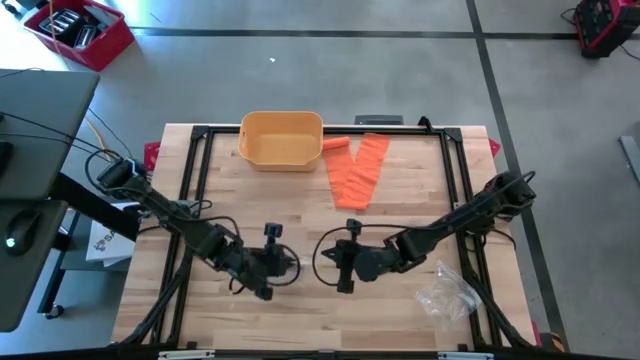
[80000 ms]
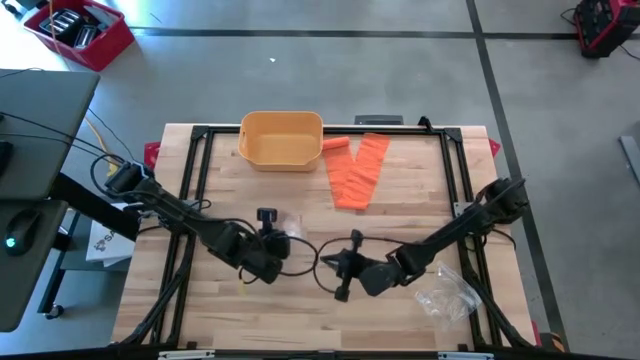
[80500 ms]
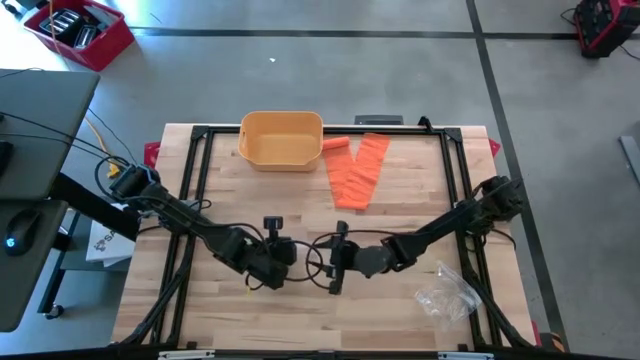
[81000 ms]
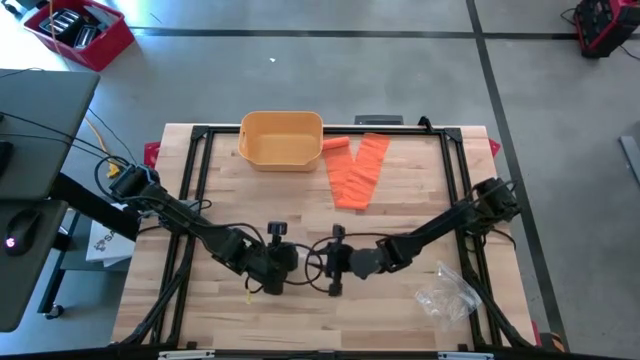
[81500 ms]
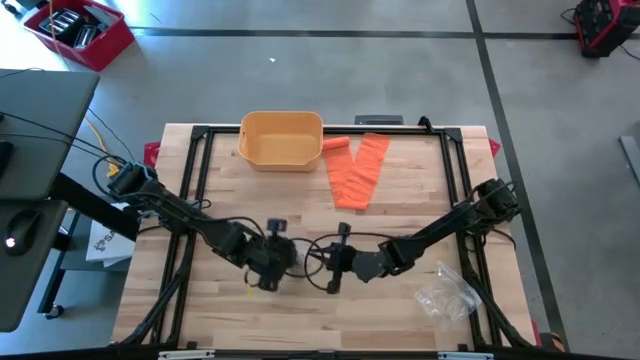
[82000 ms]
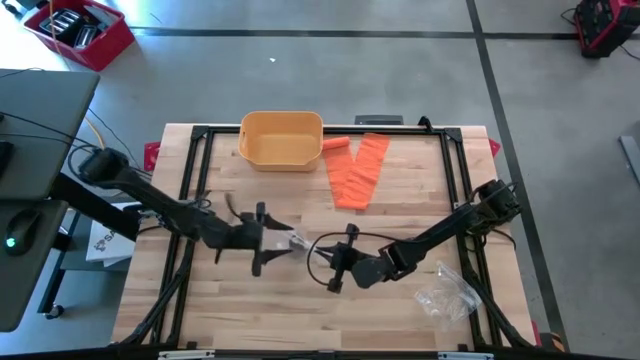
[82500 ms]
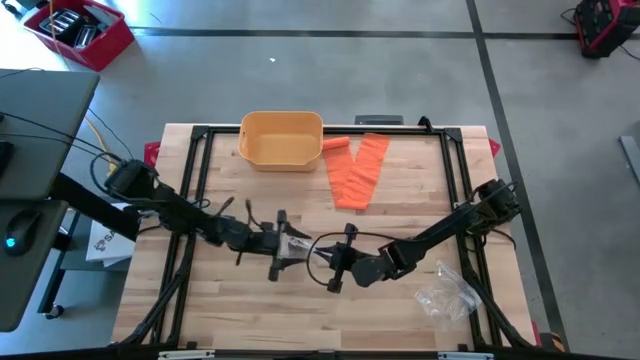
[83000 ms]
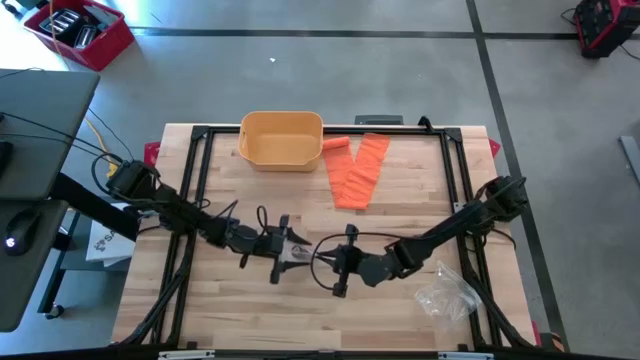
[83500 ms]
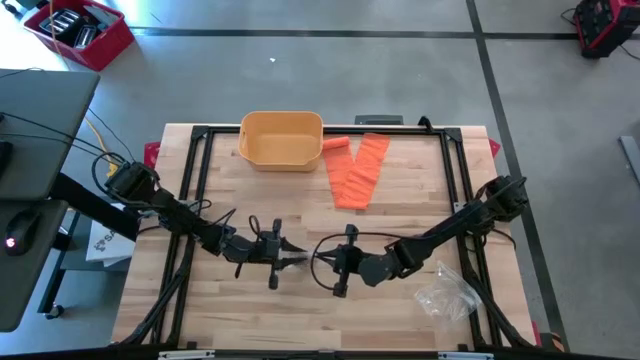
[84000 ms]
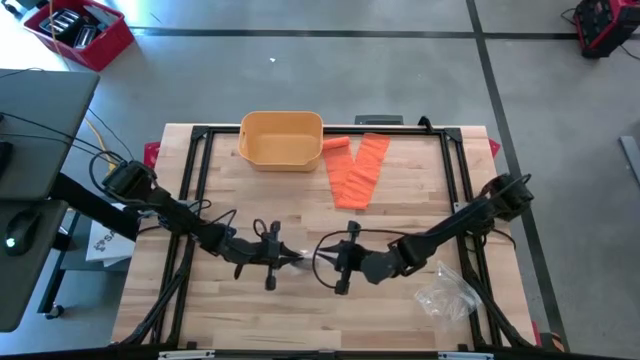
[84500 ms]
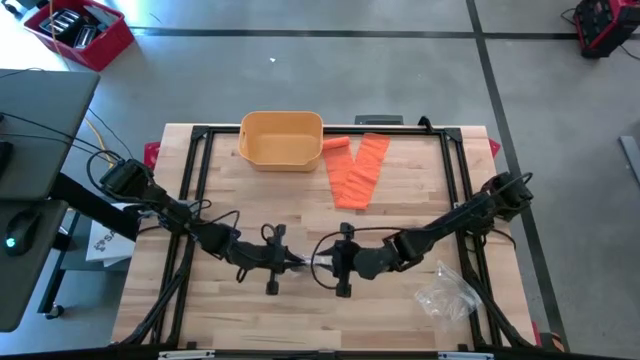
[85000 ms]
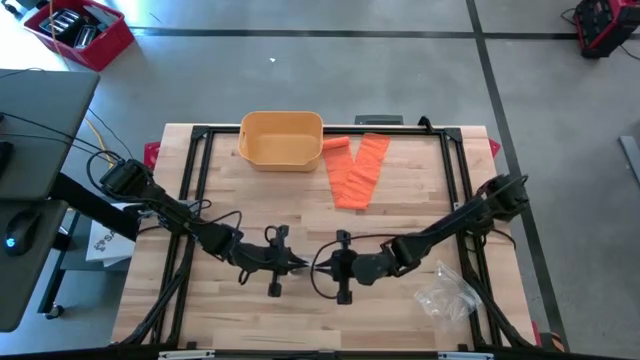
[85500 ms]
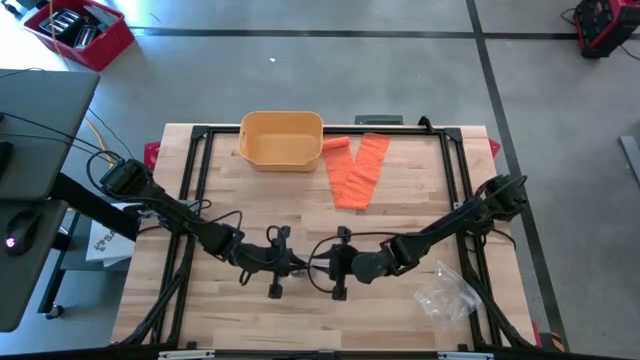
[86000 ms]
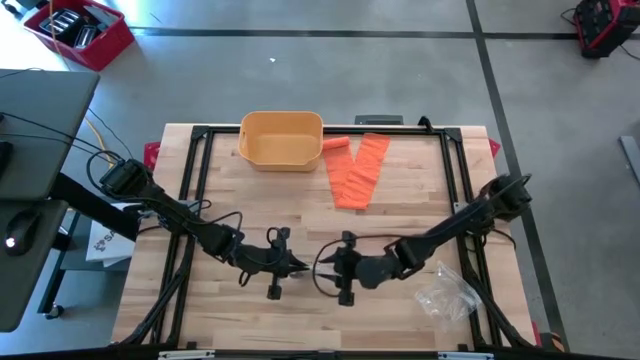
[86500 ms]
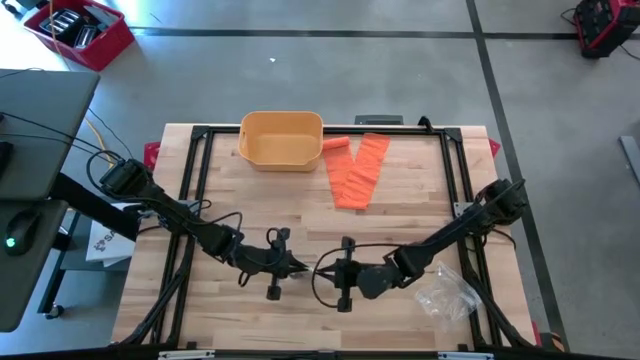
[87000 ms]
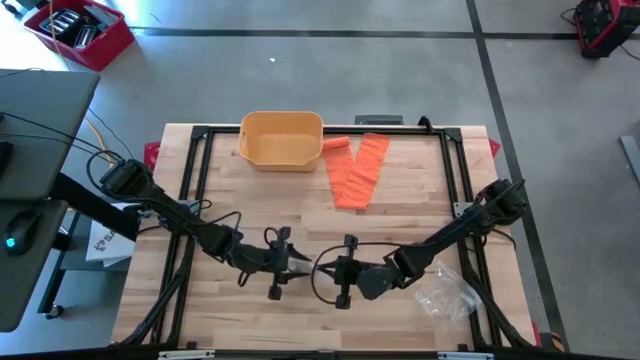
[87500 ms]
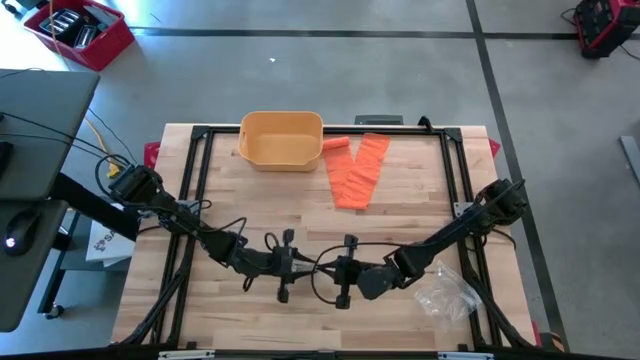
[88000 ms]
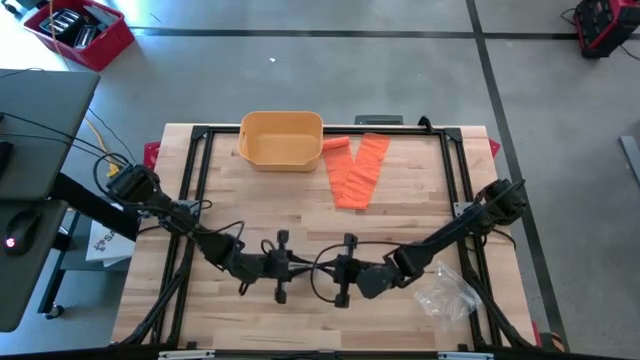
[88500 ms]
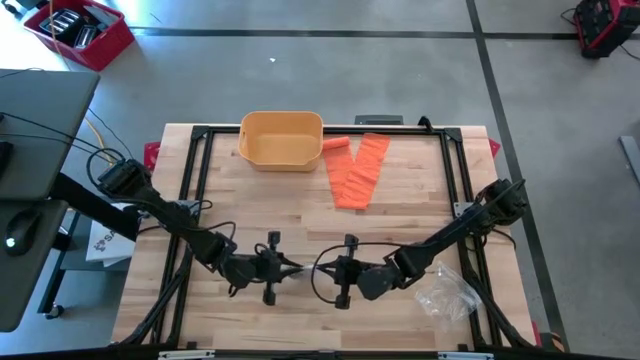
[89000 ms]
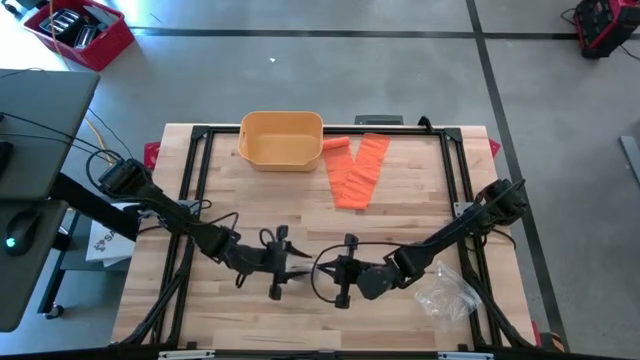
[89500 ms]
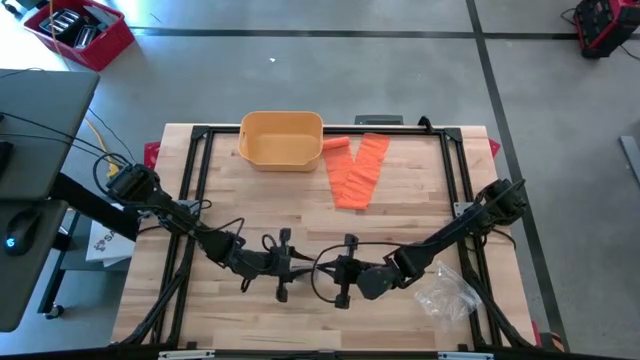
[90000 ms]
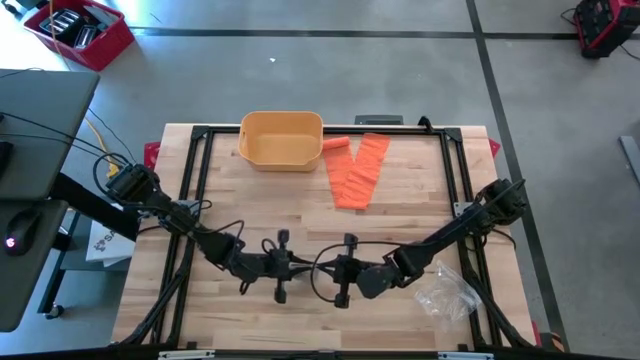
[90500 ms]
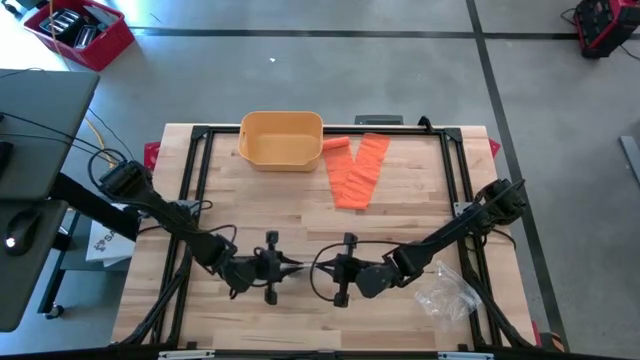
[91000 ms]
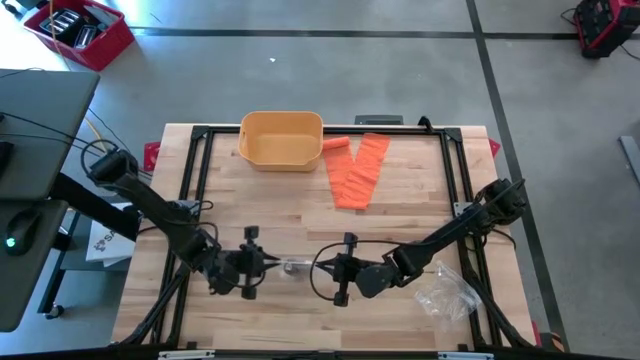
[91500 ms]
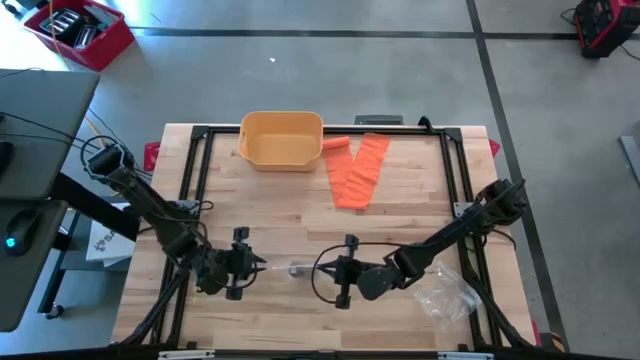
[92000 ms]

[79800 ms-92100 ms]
Task: Roll bandage
Close the left transparent zip bag

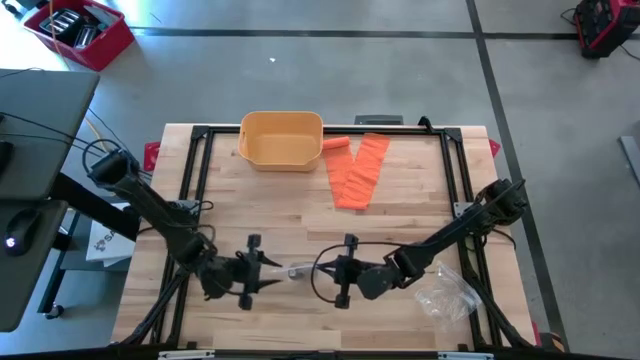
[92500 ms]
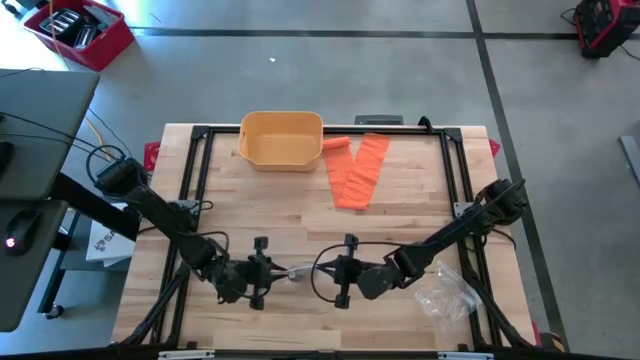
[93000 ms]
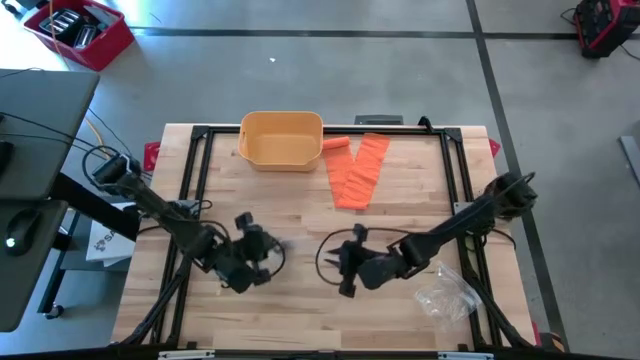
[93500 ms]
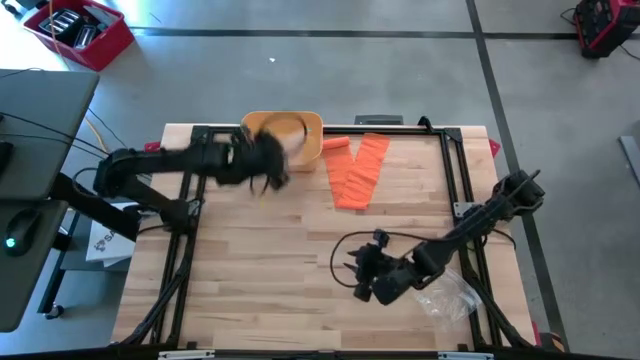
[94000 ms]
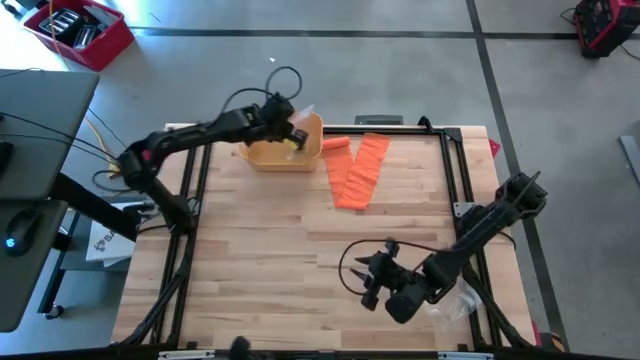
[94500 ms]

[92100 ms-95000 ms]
Put the left transparent zip bag containing the rolled brown bandage into the yellow bin

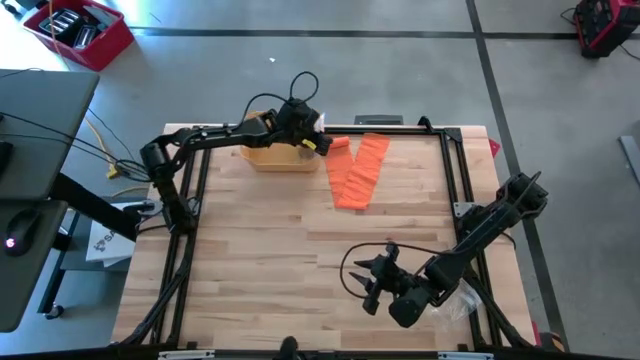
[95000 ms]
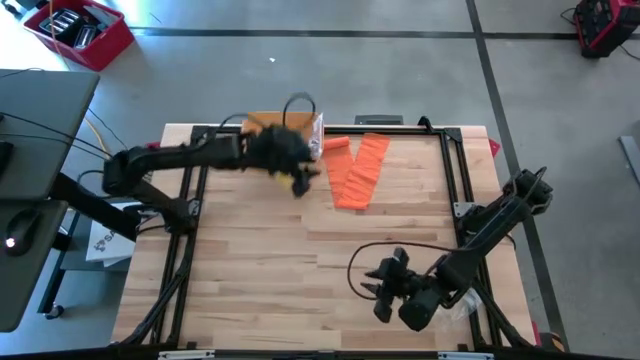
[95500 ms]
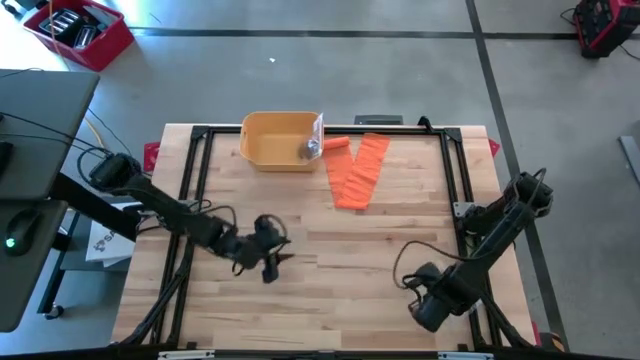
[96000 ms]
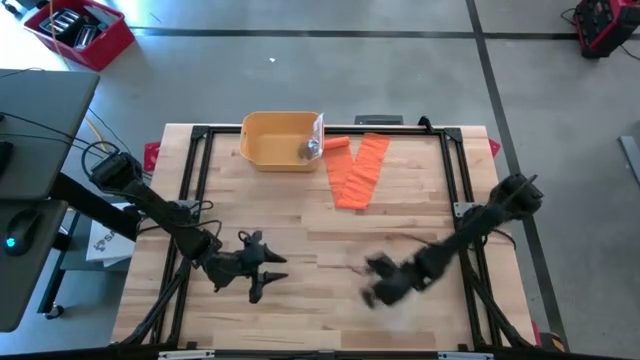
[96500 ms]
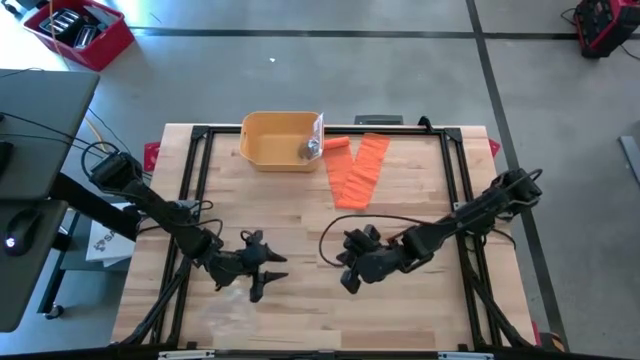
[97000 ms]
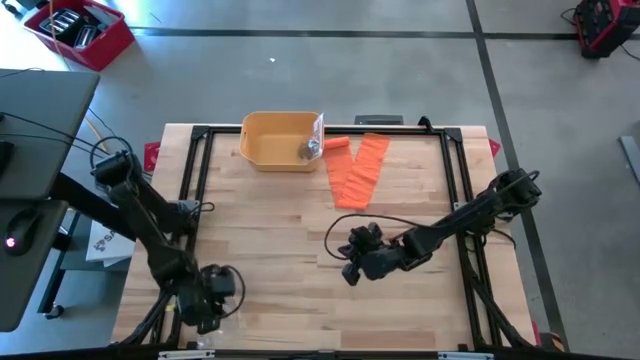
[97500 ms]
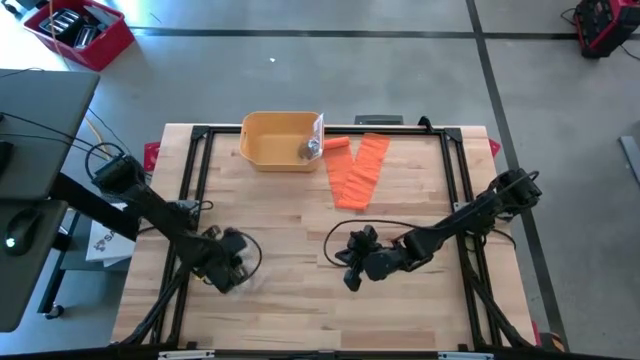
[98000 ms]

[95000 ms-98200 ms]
Move the transparent zip bag to the bottom left of the table

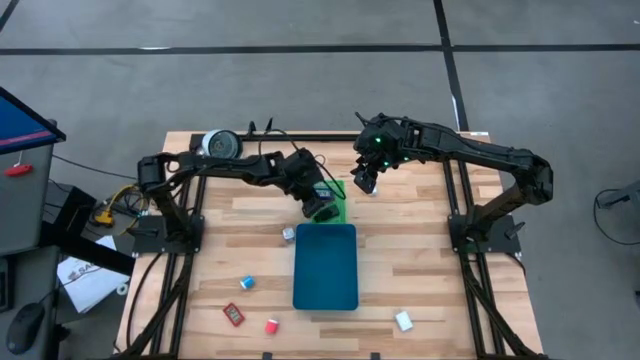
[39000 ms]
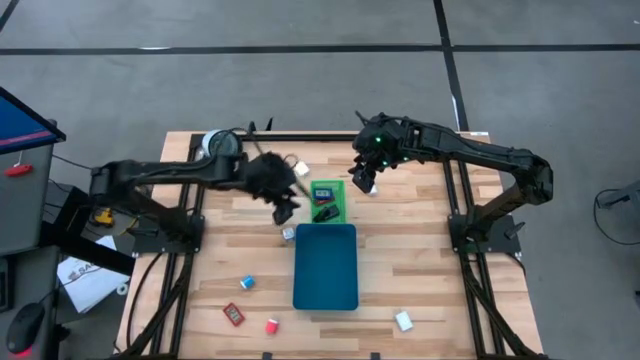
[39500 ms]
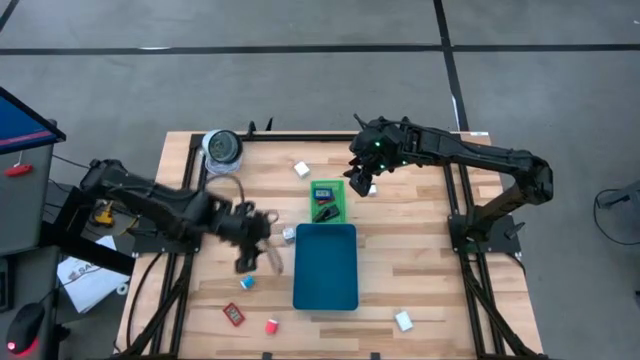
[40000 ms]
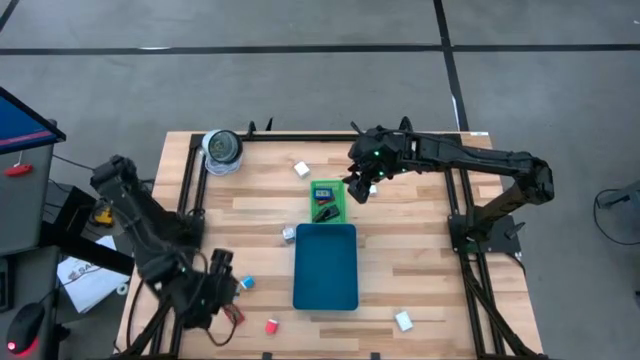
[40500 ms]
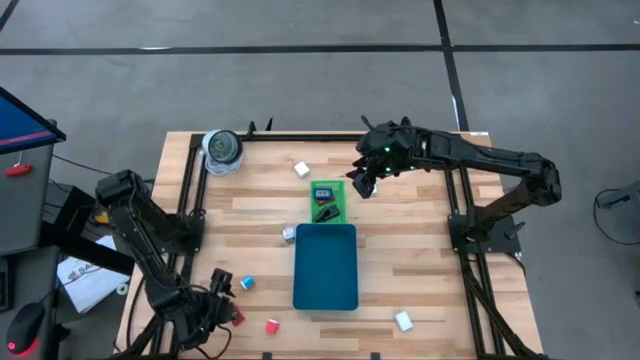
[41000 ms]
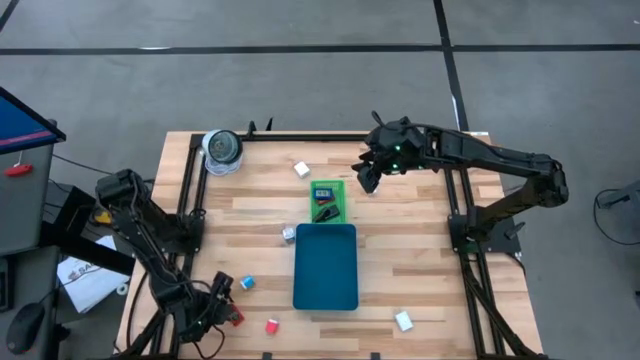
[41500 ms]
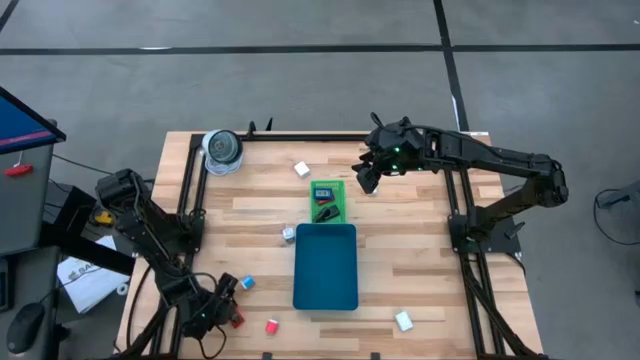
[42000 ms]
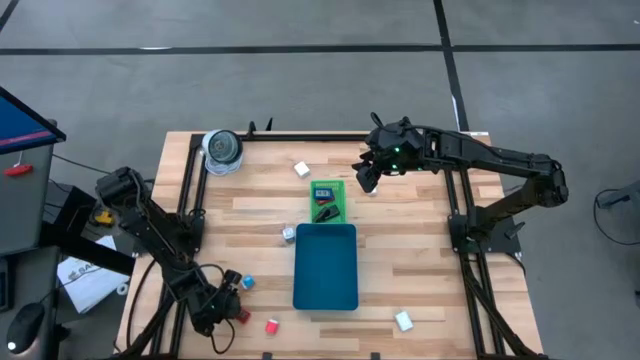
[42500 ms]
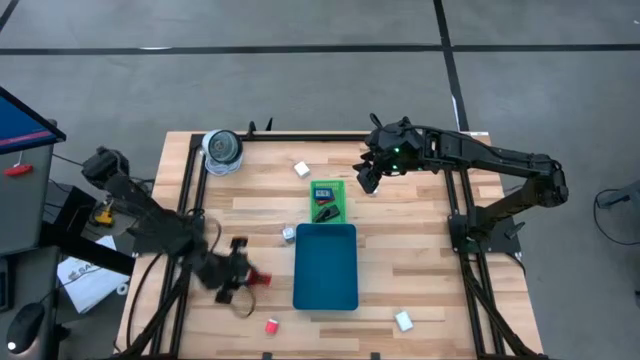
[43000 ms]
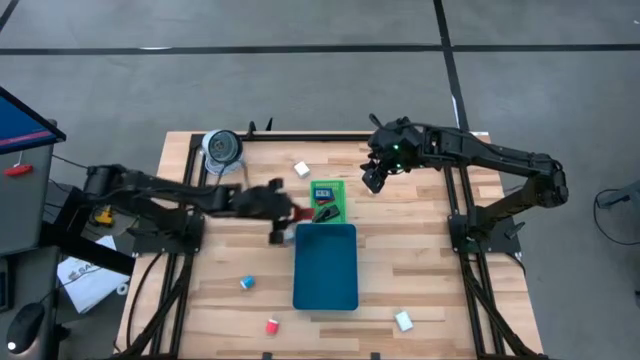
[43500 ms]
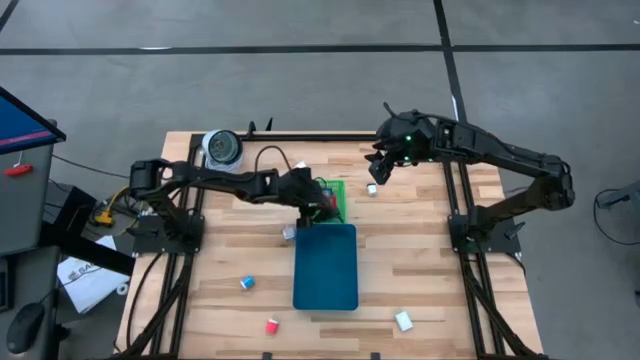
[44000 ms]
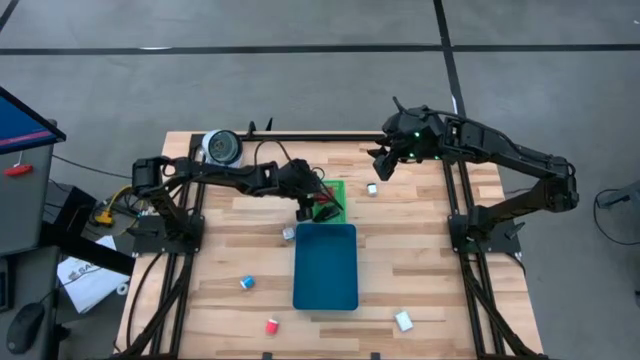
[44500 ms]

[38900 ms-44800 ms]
Task: Pick & Place Office items
Put the red digital clock into the green bin
